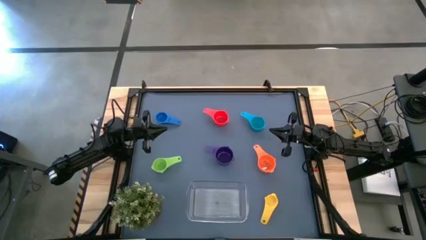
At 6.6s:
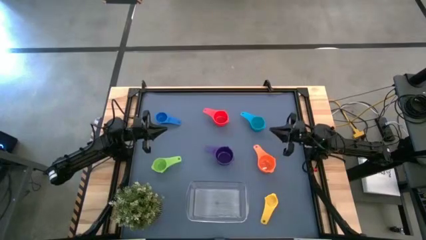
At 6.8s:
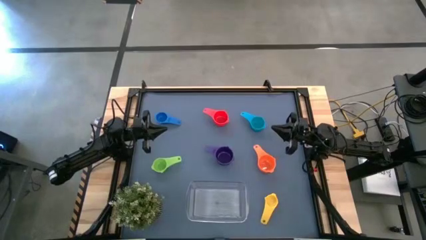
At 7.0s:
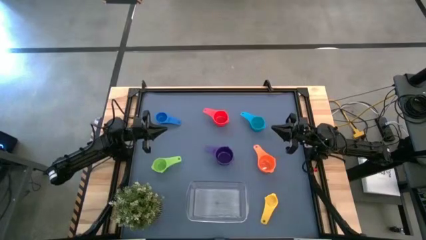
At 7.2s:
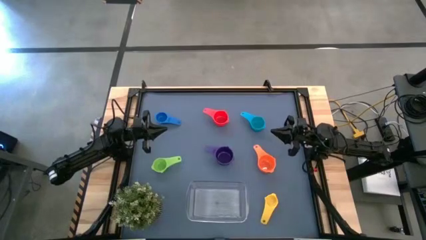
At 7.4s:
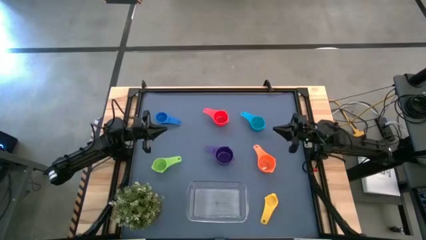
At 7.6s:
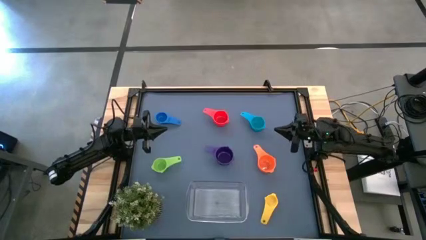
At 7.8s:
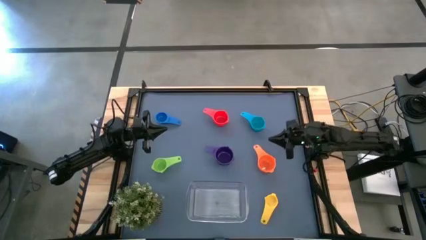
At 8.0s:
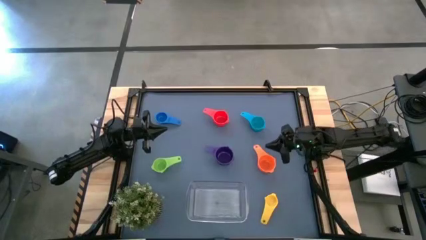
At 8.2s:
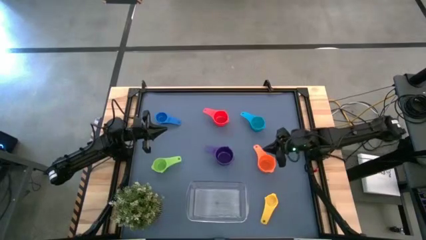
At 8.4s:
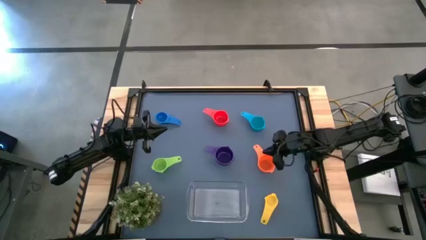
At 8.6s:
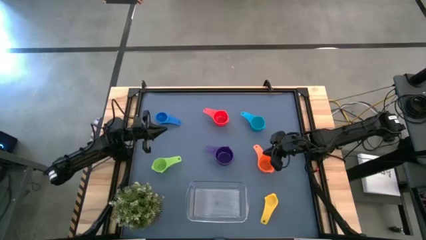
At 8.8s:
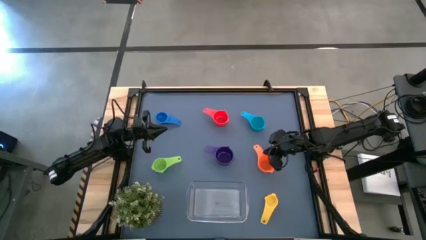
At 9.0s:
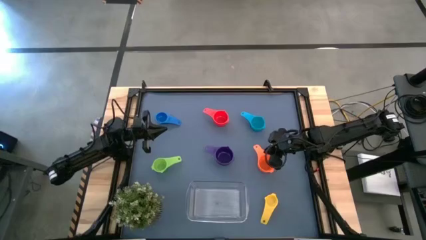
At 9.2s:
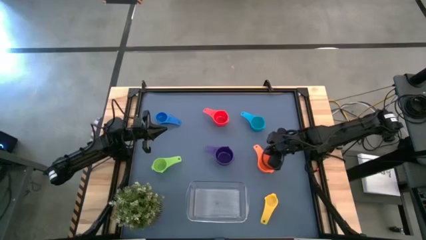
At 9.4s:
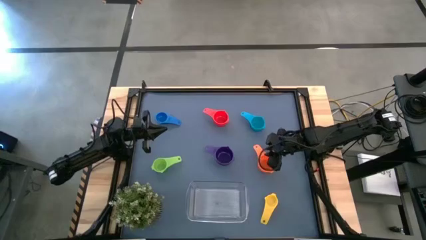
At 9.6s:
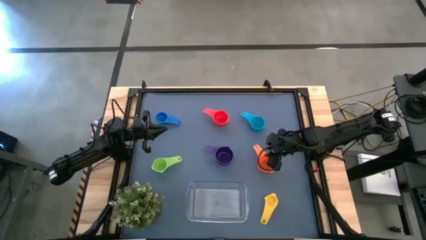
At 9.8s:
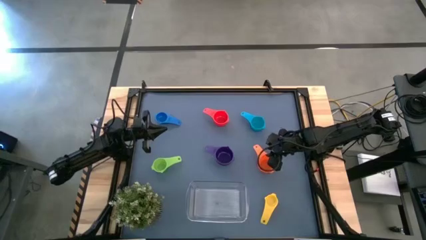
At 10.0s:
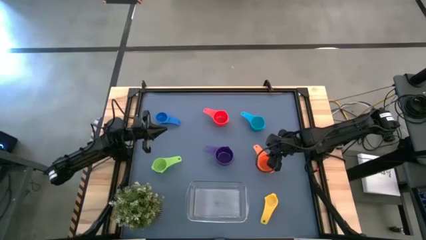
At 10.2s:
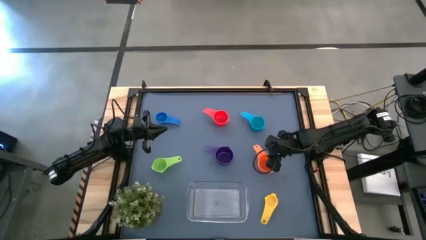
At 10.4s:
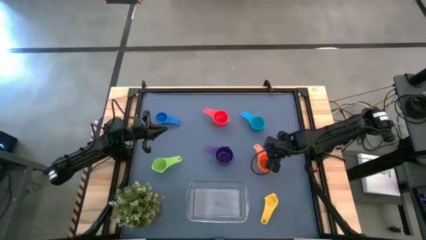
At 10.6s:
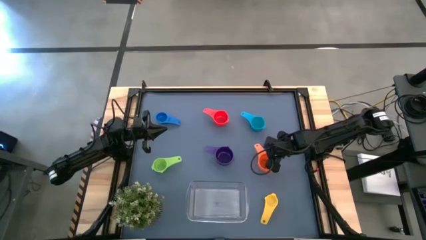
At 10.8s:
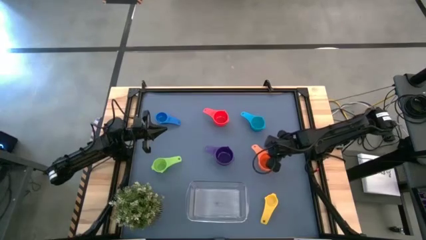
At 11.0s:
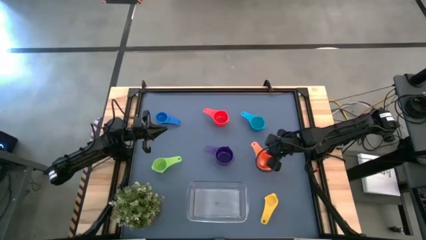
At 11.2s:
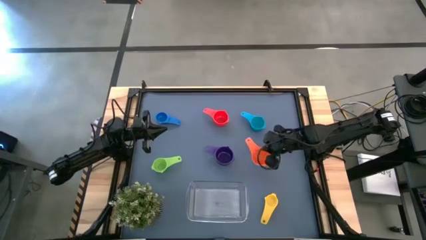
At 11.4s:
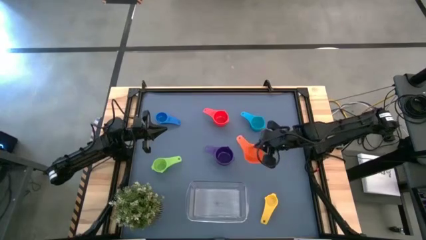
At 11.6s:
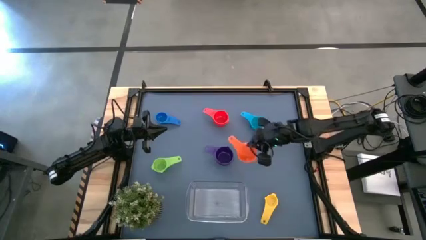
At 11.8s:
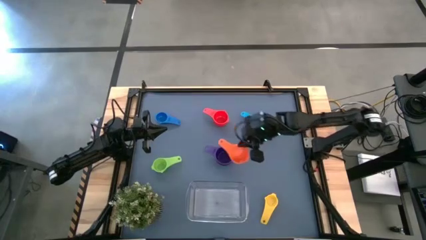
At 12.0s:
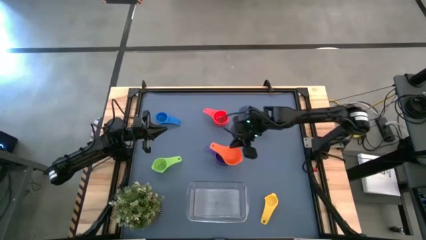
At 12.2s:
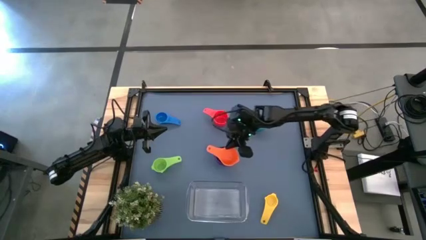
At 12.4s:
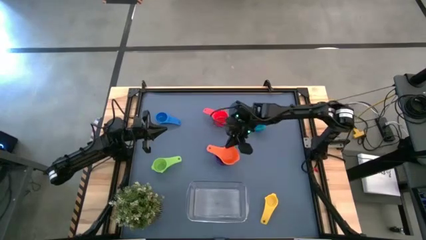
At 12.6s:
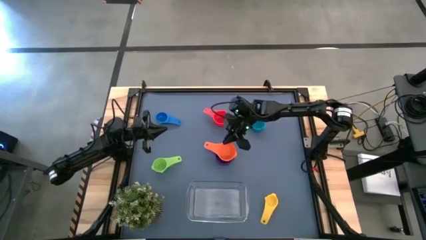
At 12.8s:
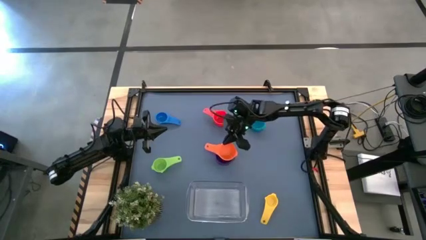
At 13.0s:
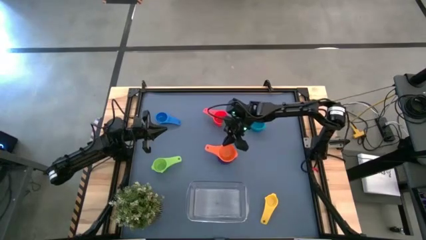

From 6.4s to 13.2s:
Task: Nest measuring cups in basket
Stack the orange measuring cup on top of the purple measuring cup

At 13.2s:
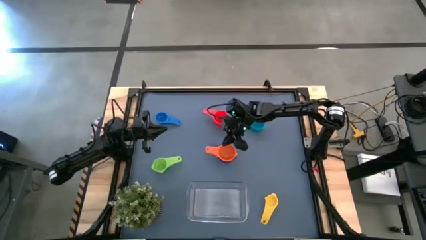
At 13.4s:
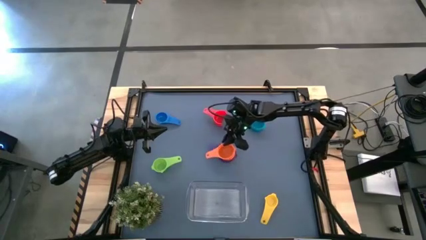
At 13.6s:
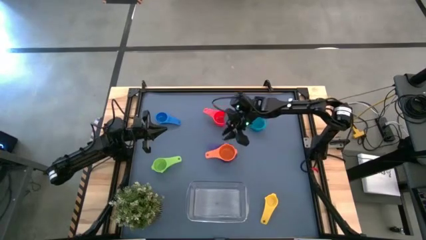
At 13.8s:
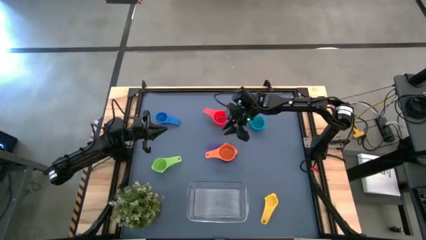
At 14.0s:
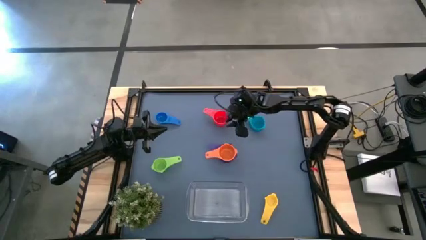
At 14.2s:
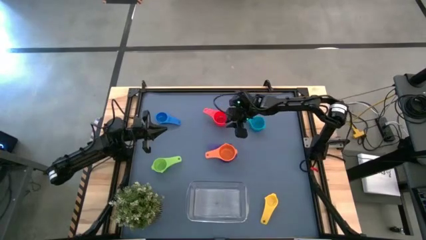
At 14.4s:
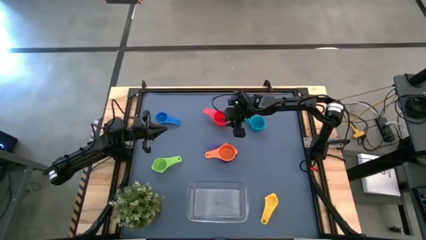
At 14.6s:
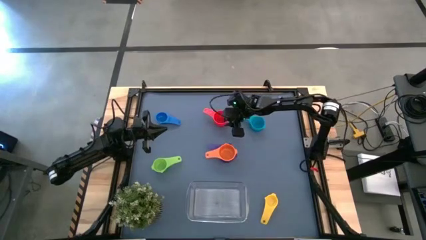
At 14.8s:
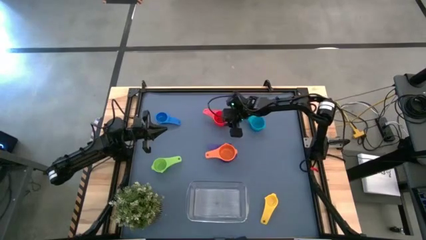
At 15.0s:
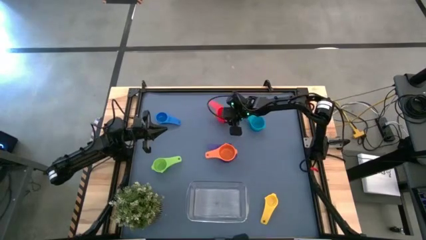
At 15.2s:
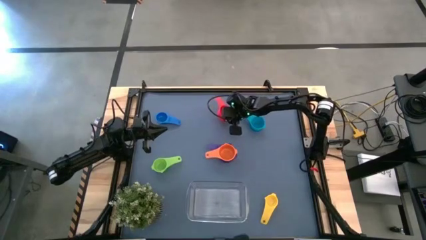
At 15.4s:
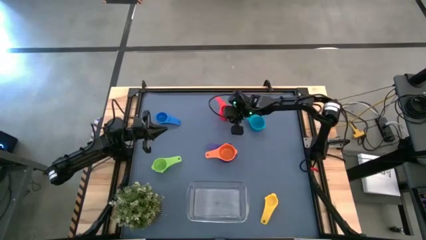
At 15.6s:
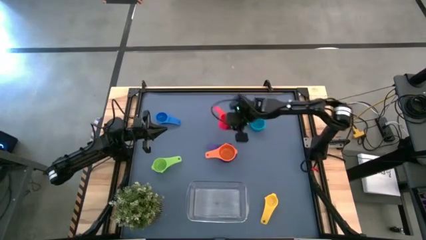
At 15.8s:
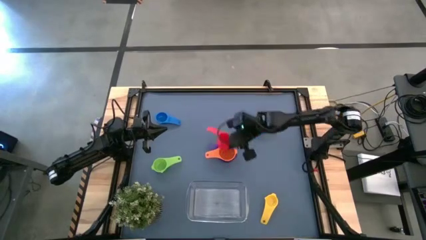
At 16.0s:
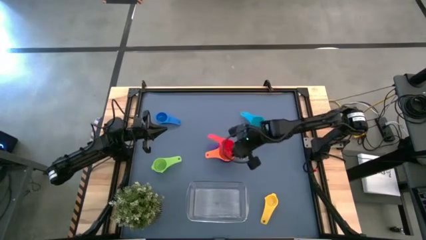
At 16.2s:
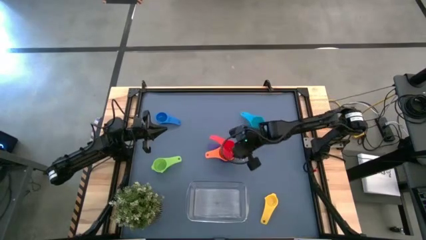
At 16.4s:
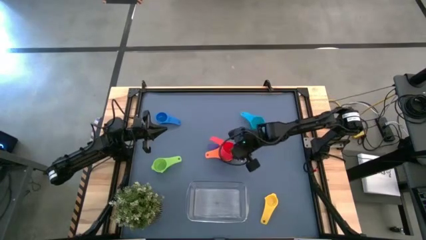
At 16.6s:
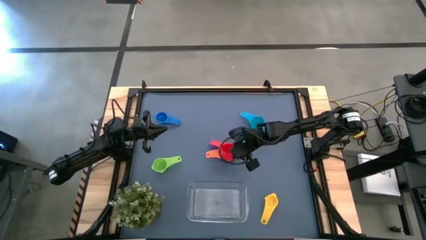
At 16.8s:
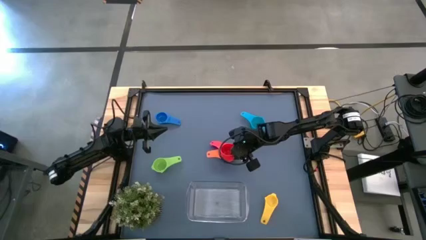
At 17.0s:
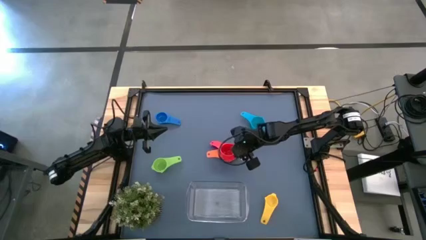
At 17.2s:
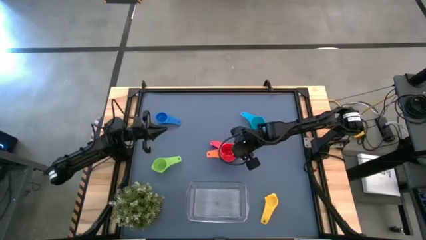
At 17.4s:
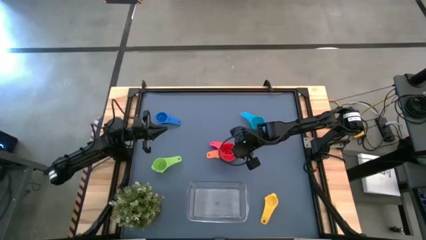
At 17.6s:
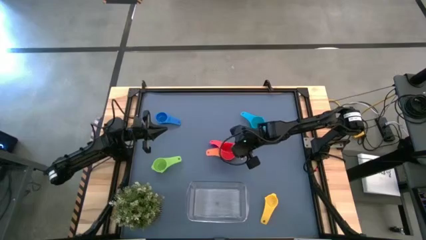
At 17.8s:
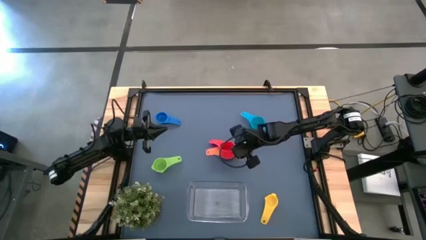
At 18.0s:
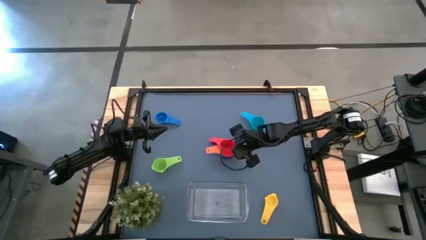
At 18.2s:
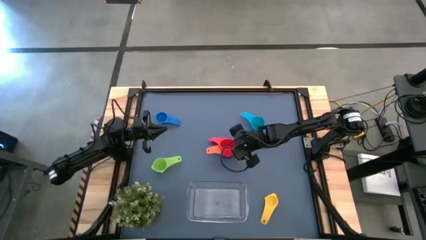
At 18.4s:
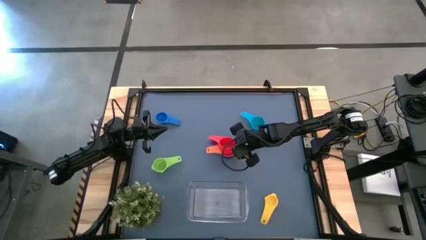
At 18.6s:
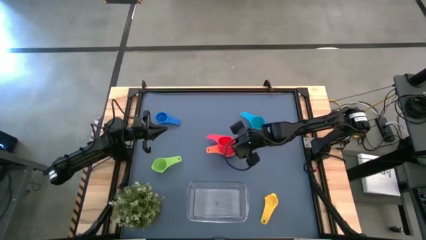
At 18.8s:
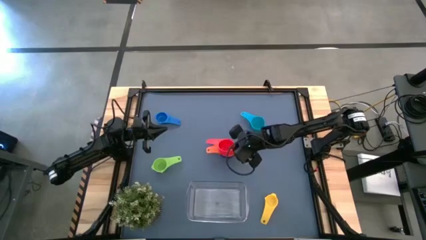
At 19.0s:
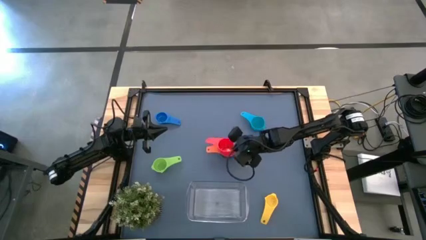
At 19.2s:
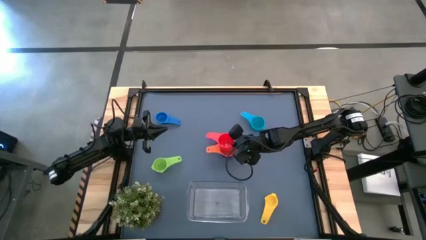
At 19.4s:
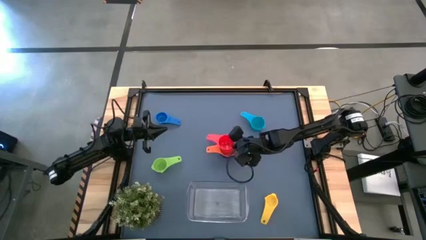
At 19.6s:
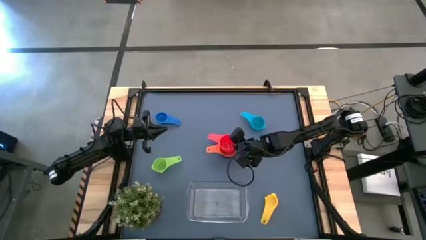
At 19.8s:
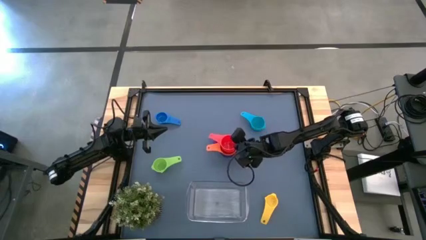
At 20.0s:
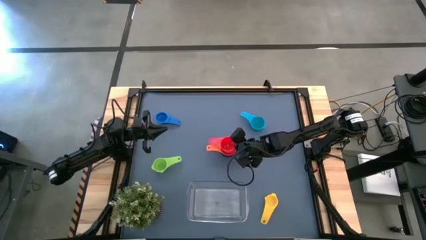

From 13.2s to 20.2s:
Stack the red measuring cup on top of the orange measuring cup

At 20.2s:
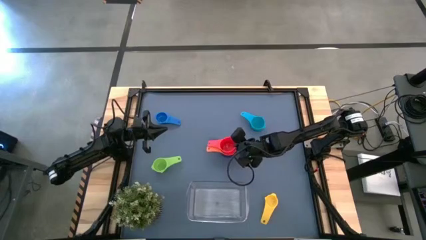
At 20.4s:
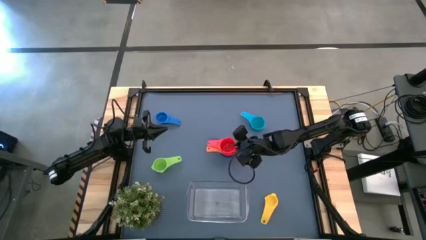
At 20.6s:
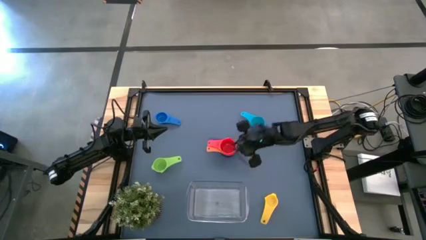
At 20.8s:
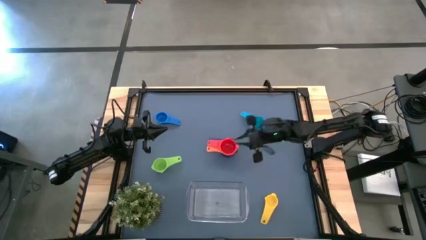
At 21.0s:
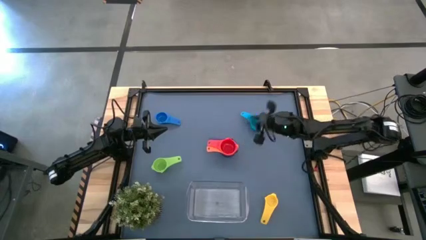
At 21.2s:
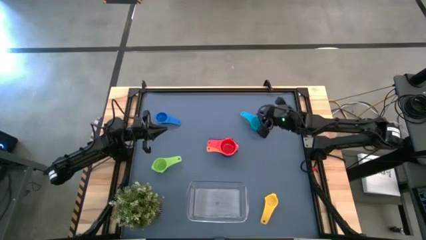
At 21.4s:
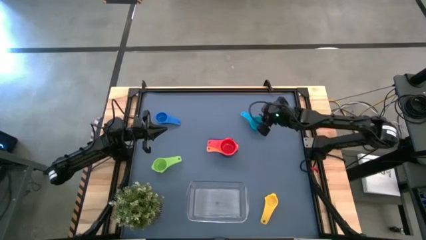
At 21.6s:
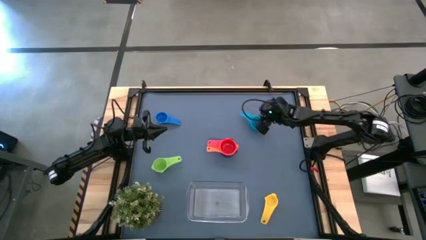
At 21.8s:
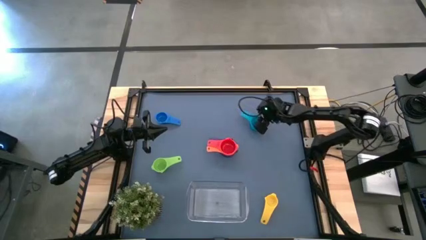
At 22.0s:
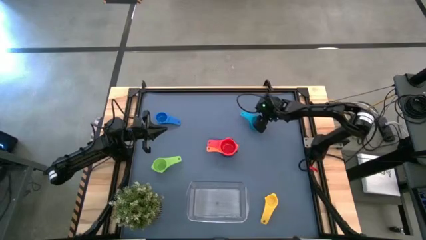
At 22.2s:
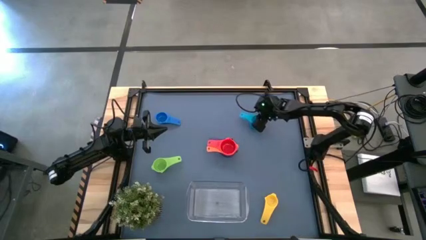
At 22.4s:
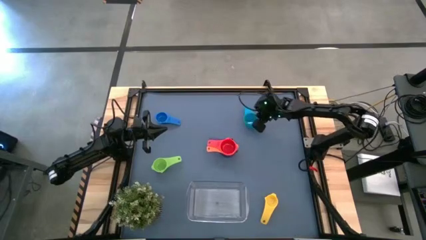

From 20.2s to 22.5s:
Stack the light blue measuring cup on top of the red measuring cup

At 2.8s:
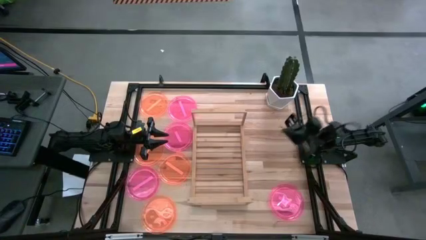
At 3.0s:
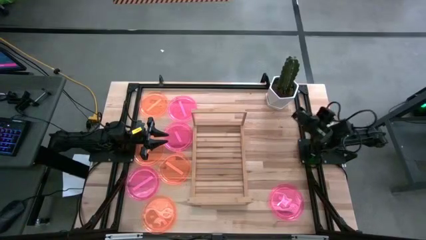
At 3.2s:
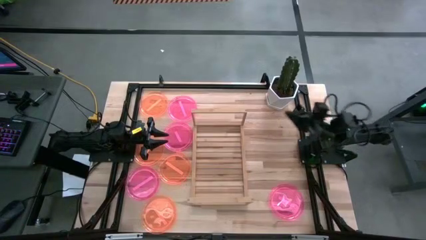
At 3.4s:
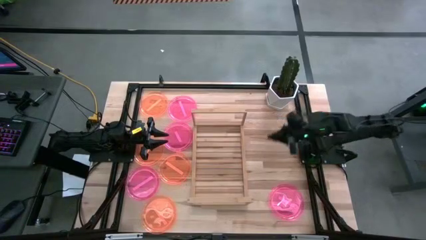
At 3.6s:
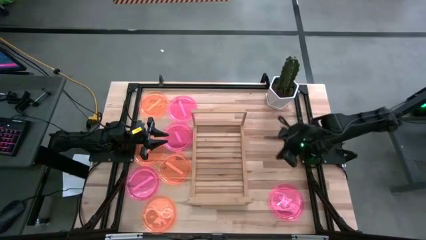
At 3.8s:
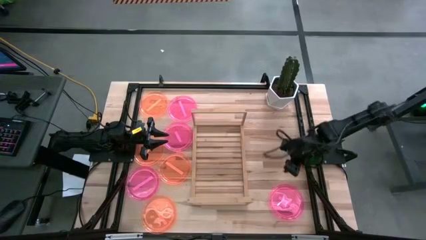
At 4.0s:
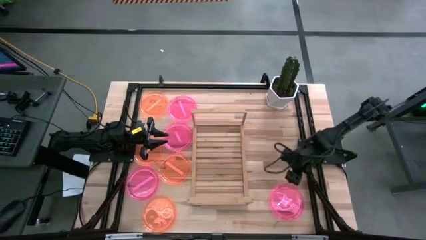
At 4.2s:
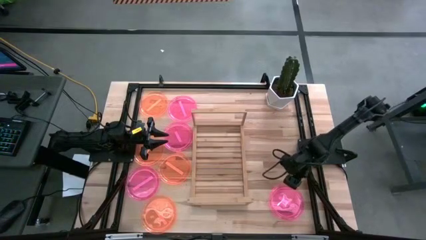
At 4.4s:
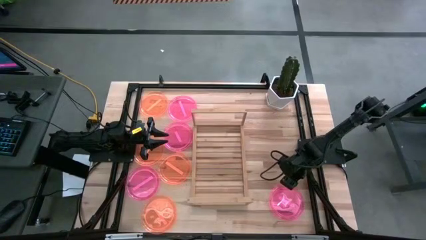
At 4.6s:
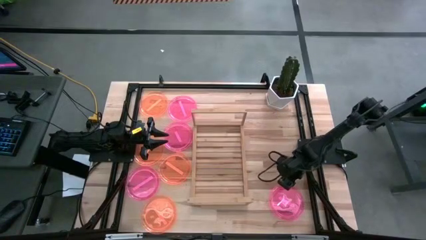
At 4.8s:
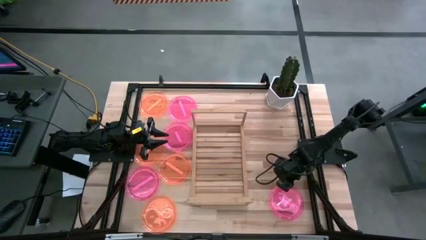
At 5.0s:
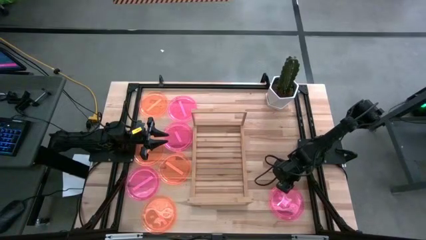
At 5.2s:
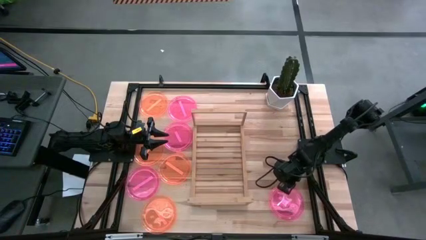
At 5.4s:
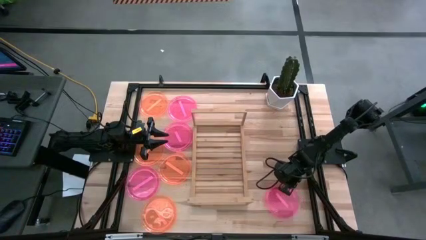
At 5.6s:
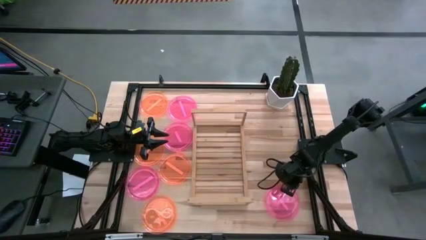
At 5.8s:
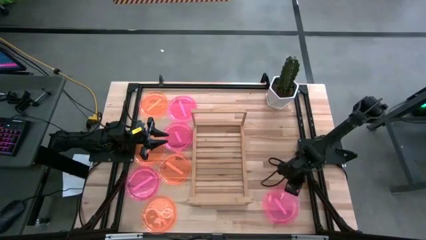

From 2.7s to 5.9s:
Task: Place and stack plates onto a shelf
Put the pink plate on the shelf
